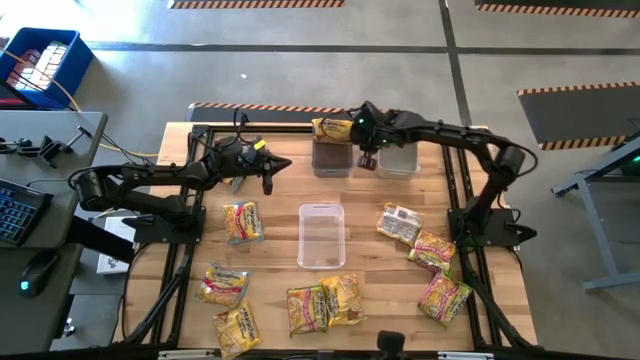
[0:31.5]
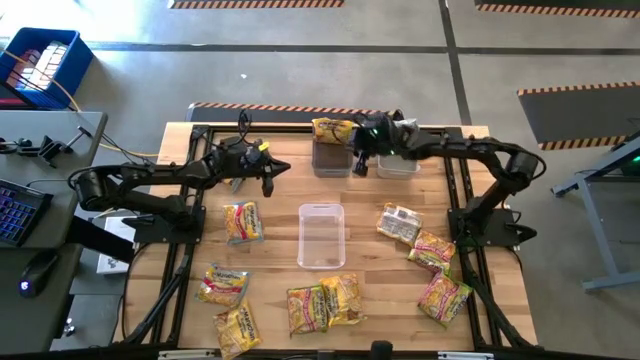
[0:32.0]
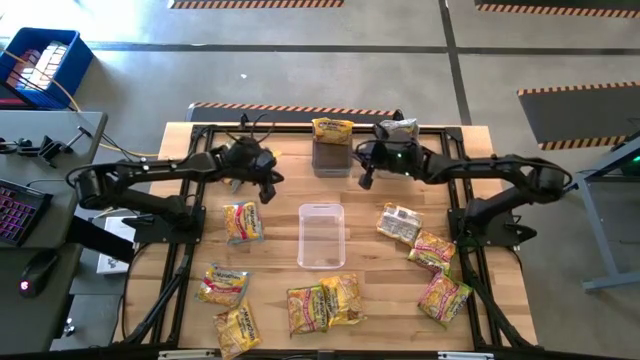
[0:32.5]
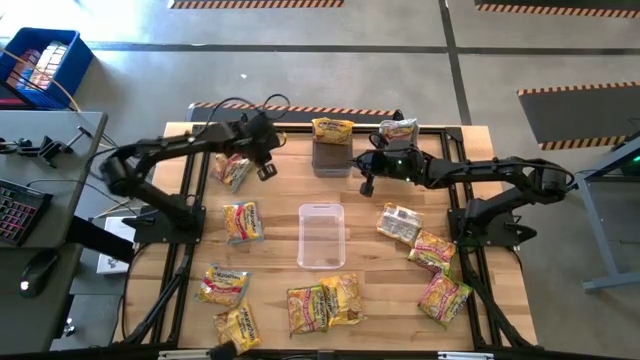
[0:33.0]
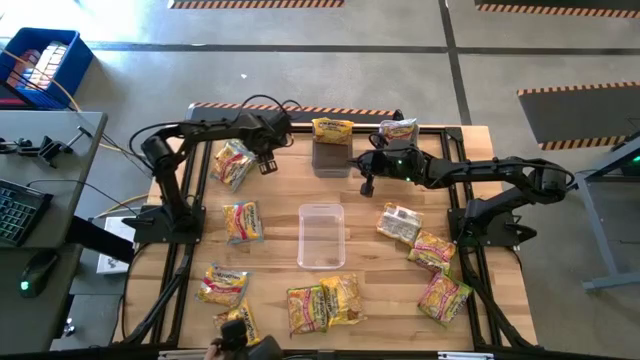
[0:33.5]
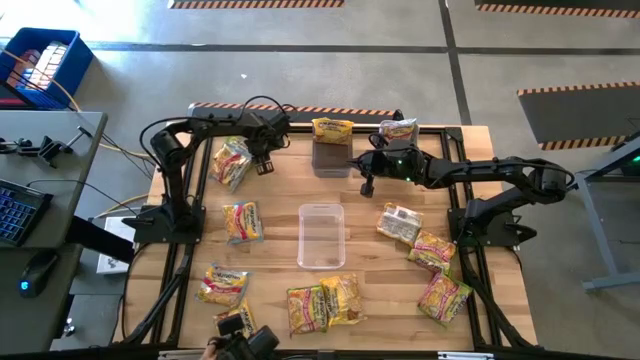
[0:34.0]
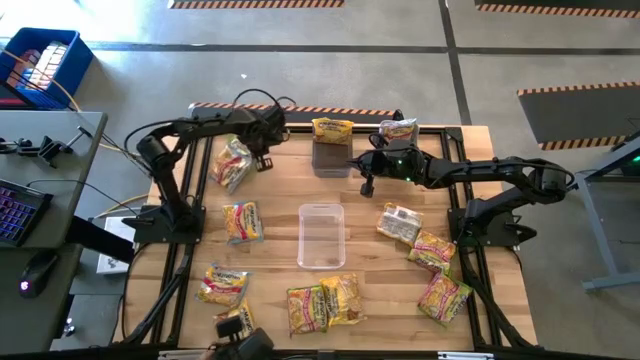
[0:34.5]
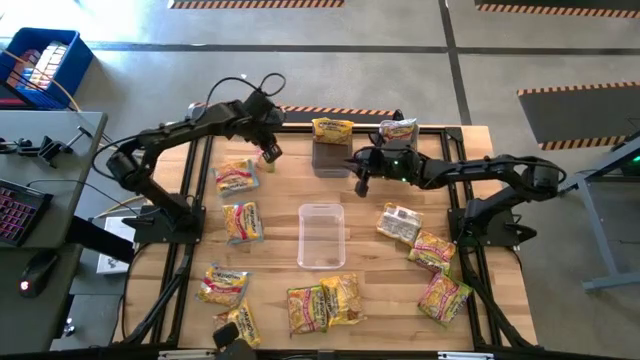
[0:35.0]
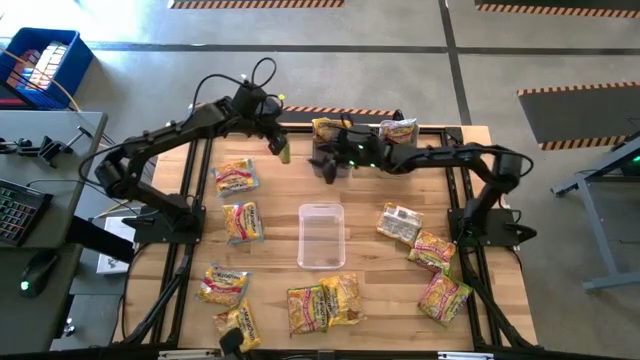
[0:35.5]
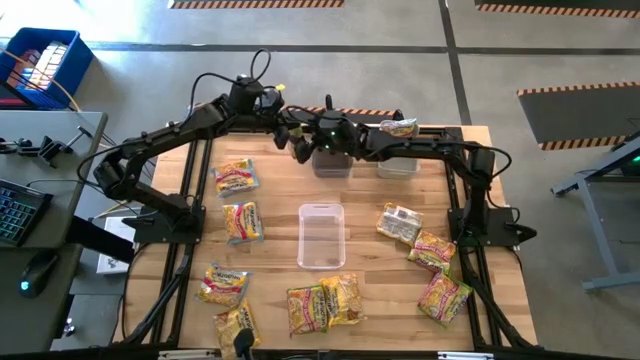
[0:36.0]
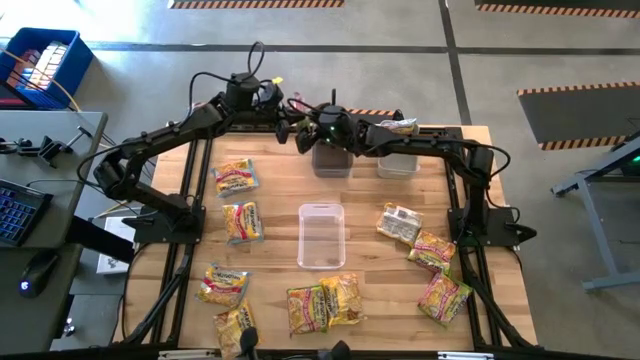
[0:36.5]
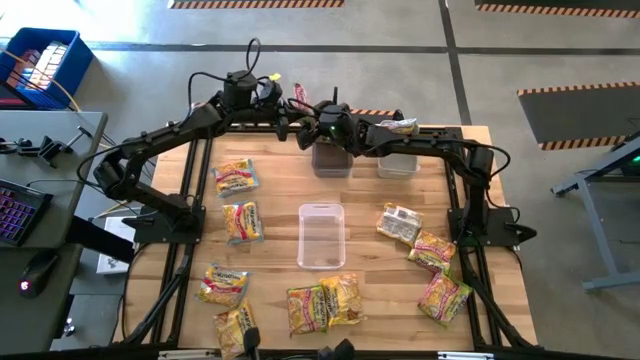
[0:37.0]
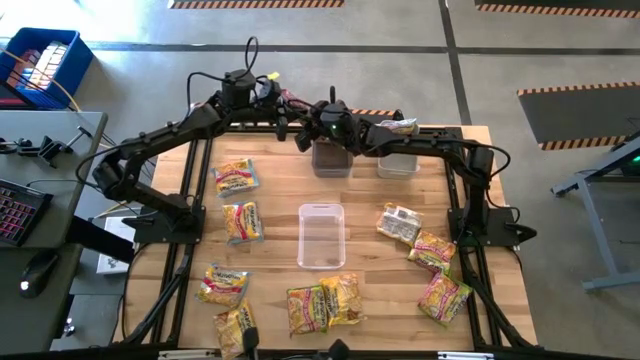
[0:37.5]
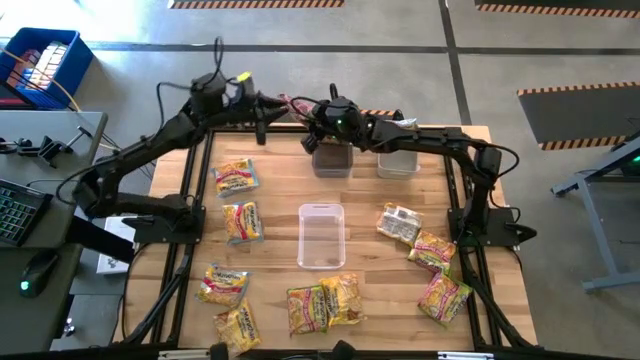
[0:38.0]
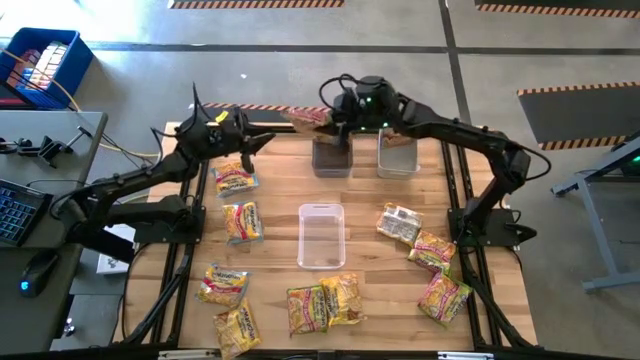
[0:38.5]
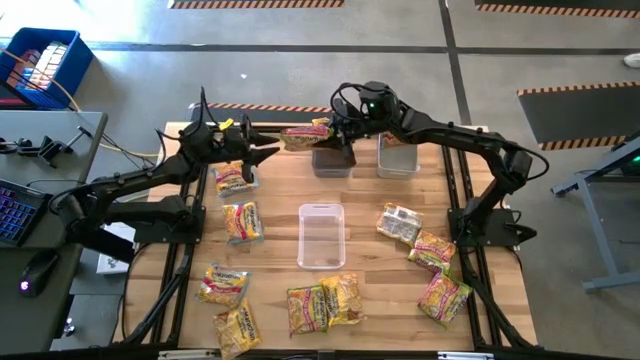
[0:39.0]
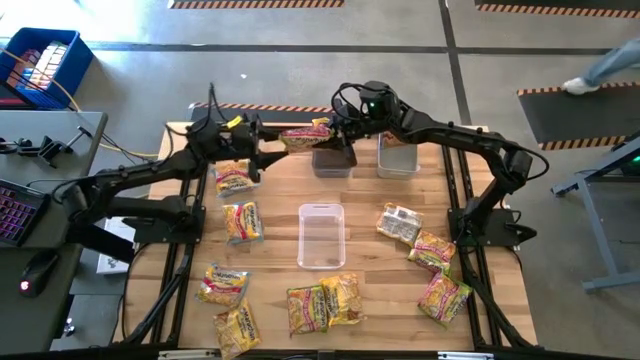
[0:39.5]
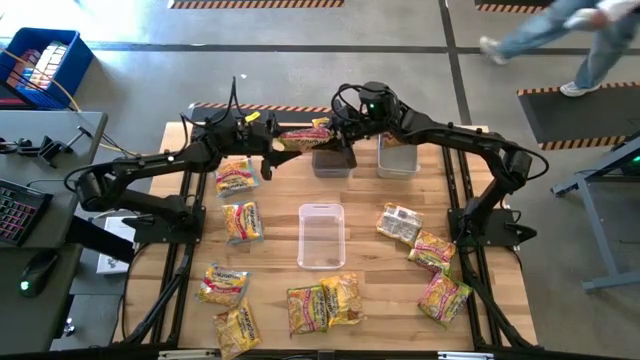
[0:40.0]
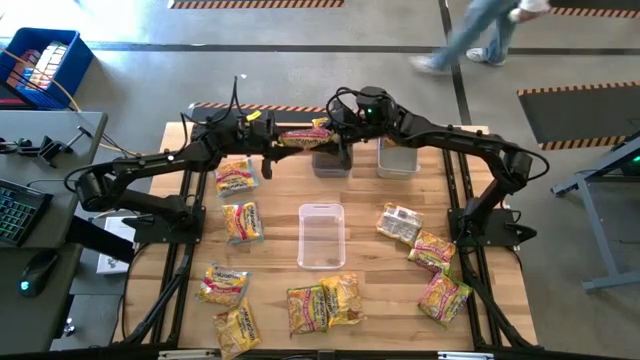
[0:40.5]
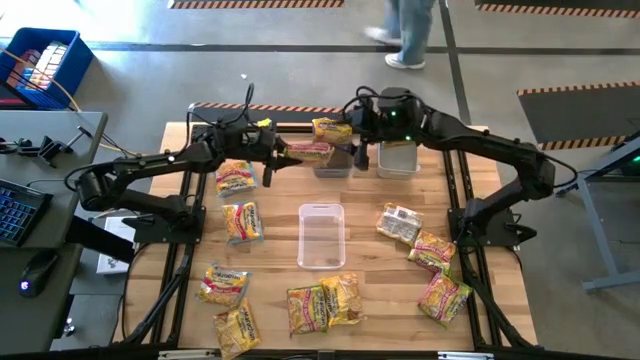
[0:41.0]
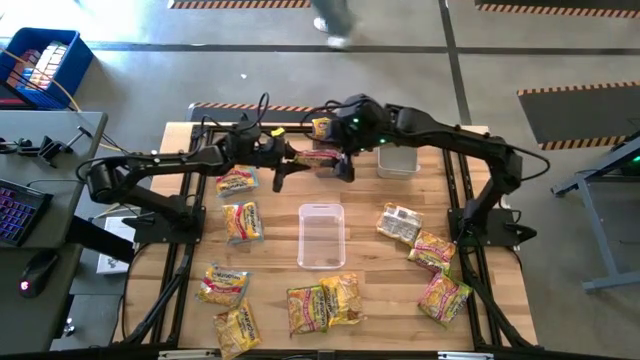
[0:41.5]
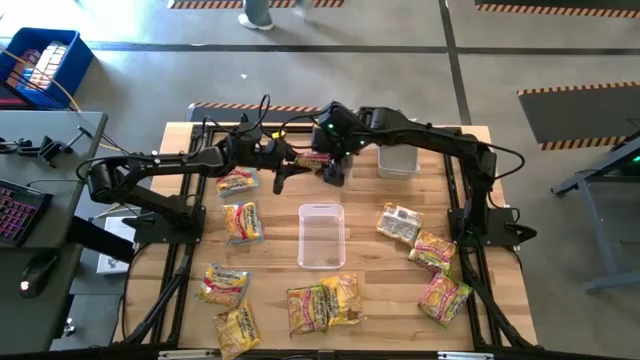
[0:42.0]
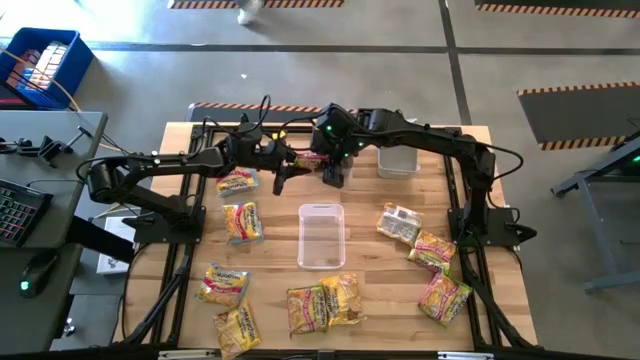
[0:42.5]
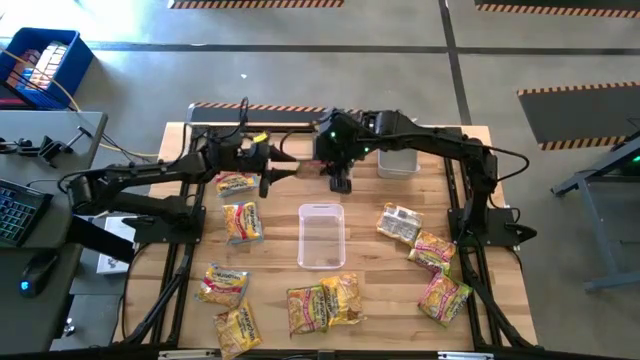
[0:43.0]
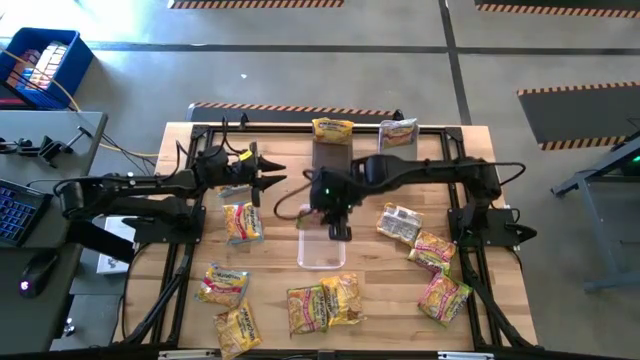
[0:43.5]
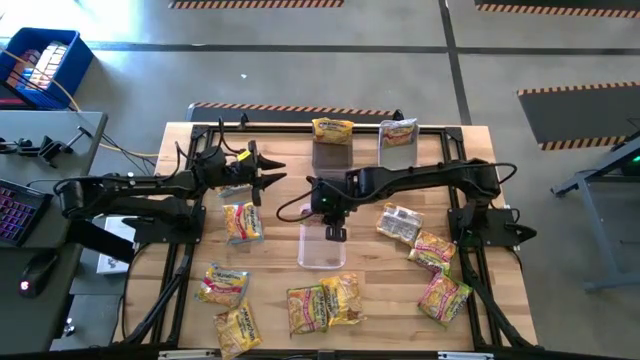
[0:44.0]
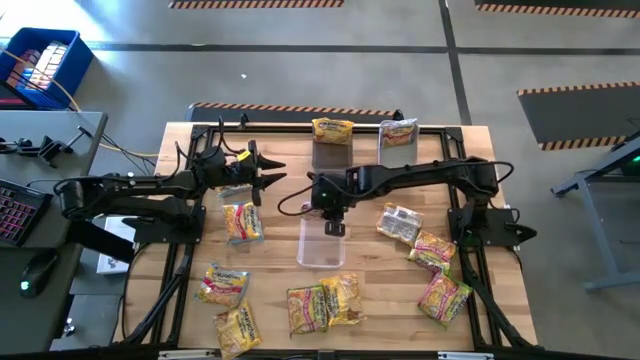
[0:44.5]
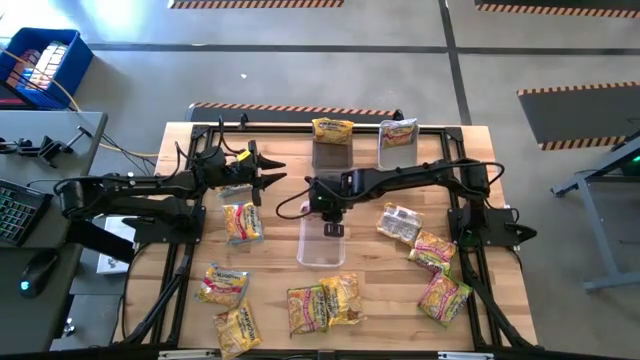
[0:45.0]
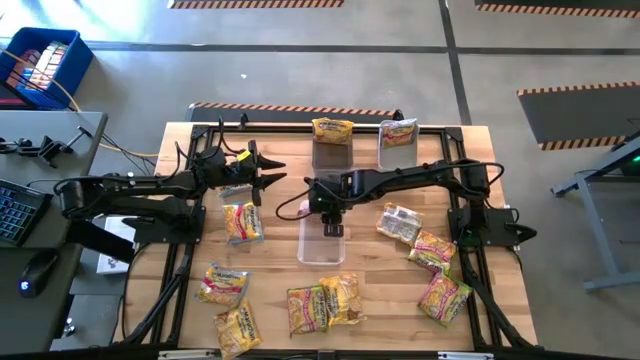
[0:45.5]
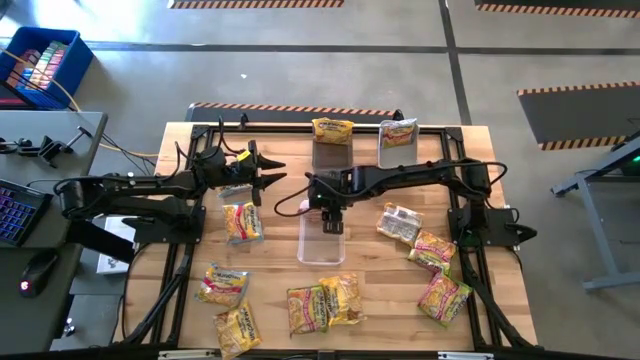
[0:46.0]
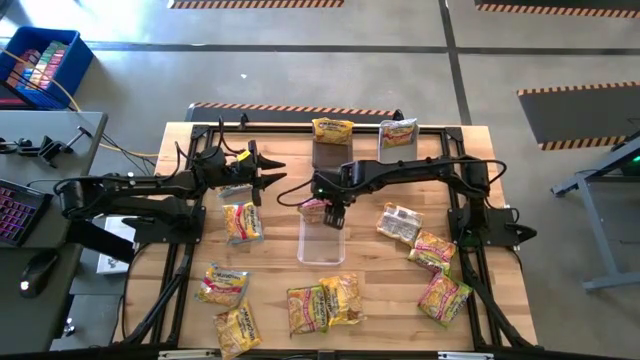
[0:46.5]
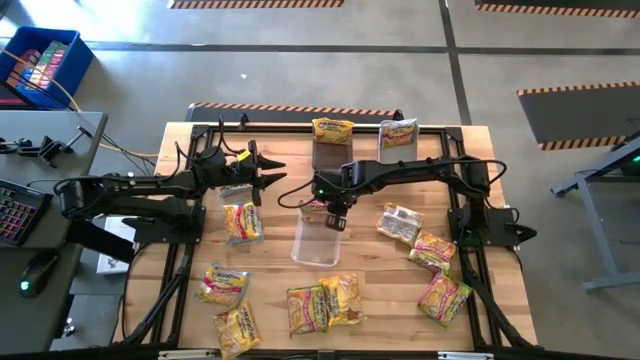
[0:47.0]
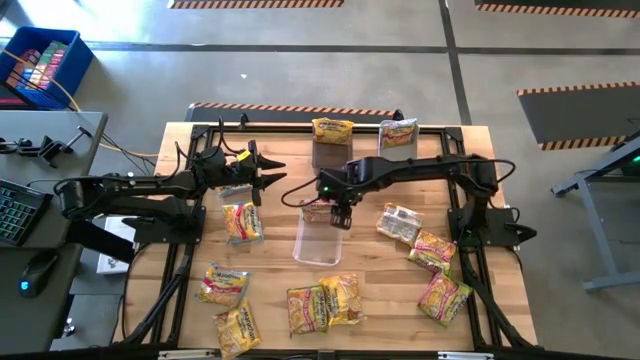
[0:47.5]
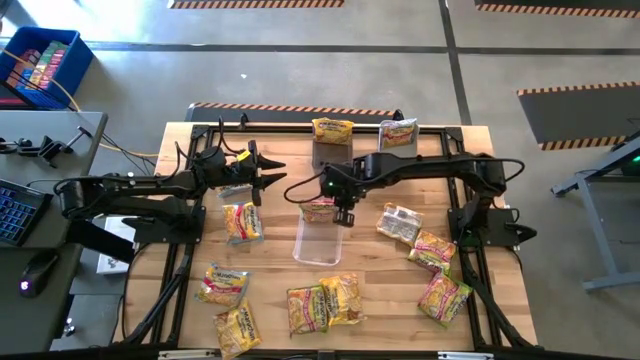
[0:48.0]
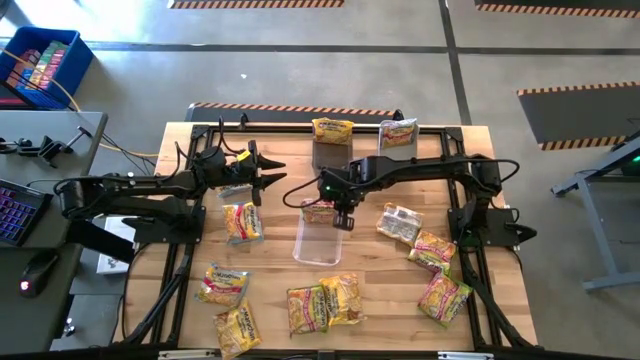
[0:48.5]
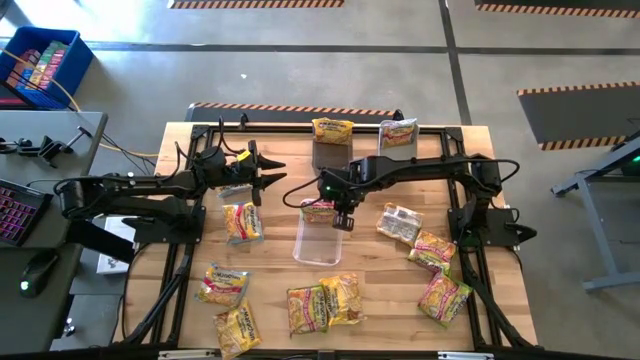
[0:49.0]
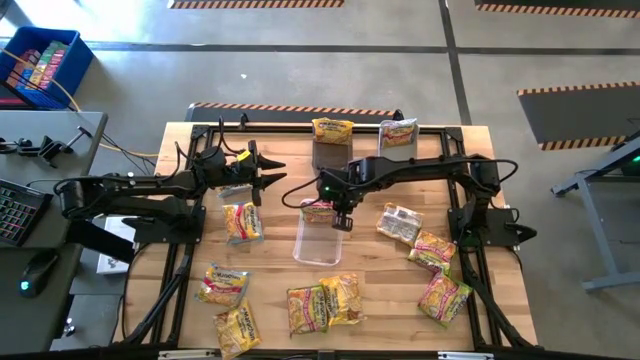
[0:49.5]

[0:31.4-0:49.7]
Task: Sort Maruchan noodles
Put the green noodle pack into the transparent bin

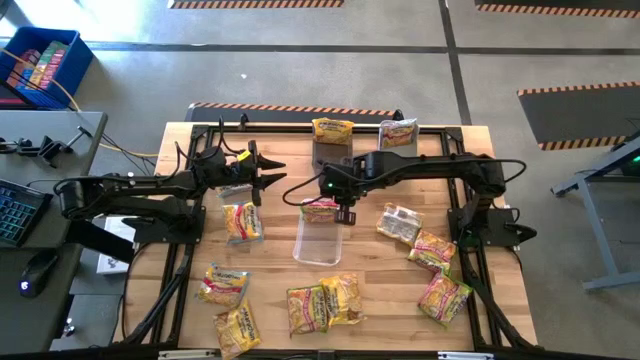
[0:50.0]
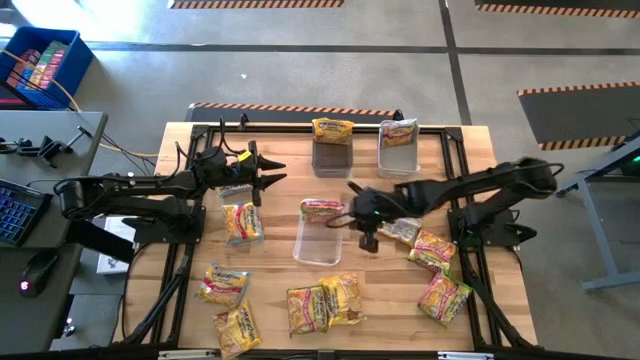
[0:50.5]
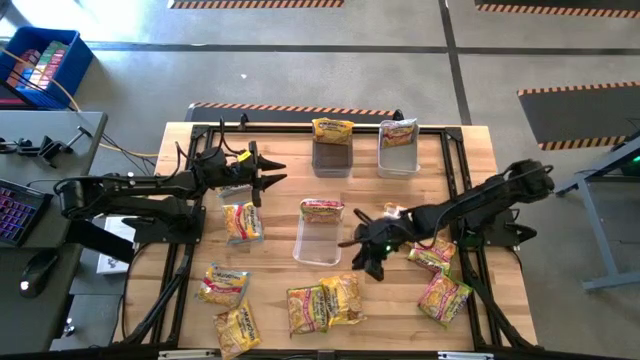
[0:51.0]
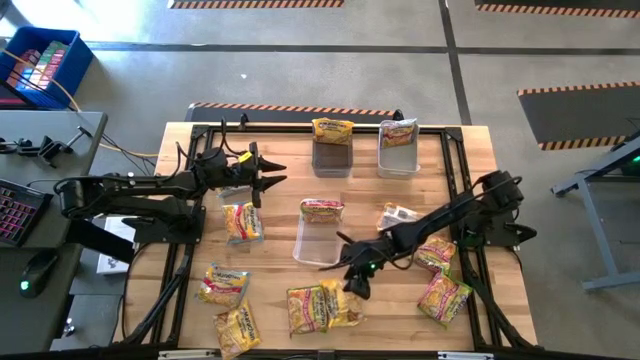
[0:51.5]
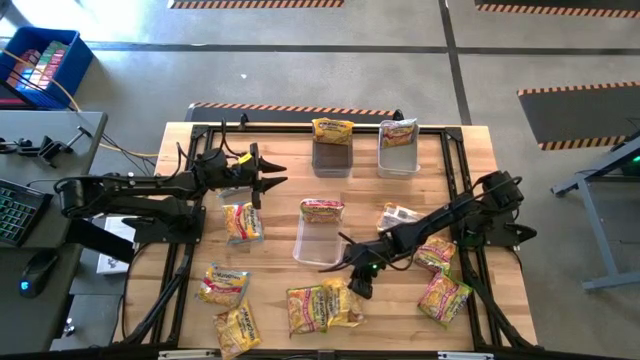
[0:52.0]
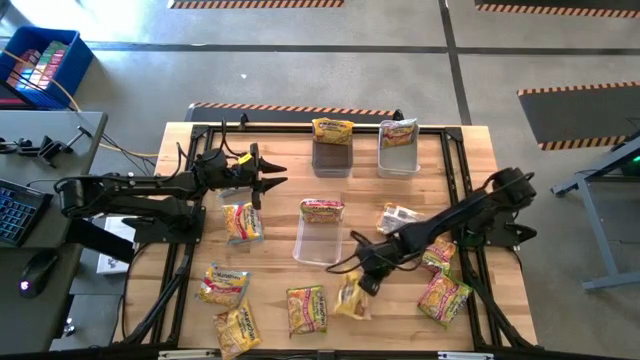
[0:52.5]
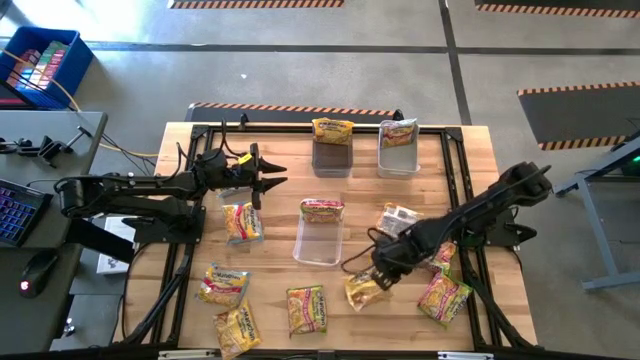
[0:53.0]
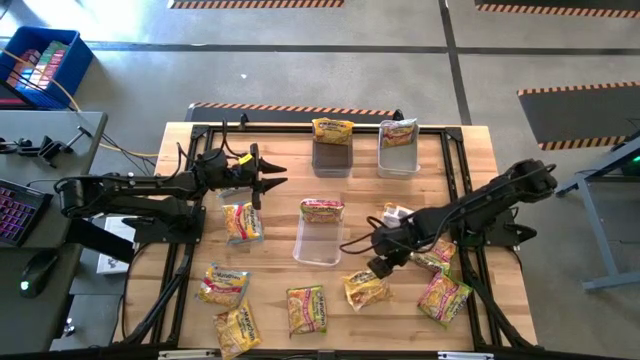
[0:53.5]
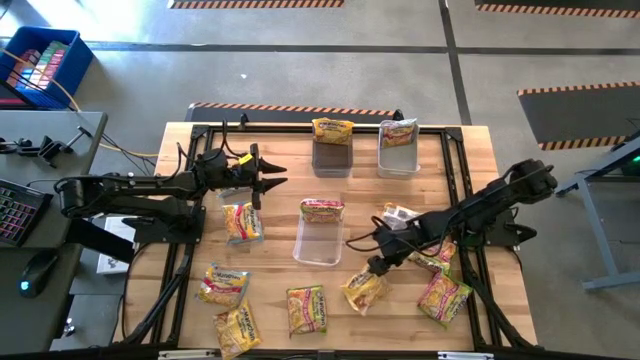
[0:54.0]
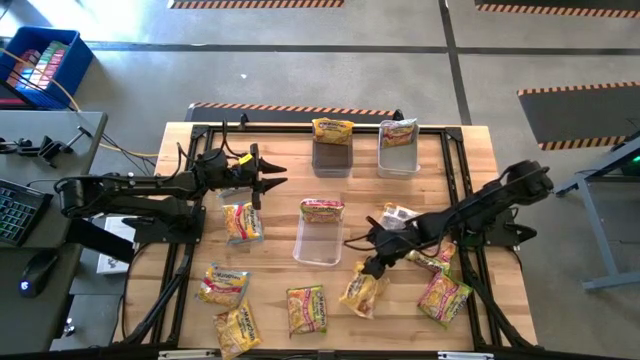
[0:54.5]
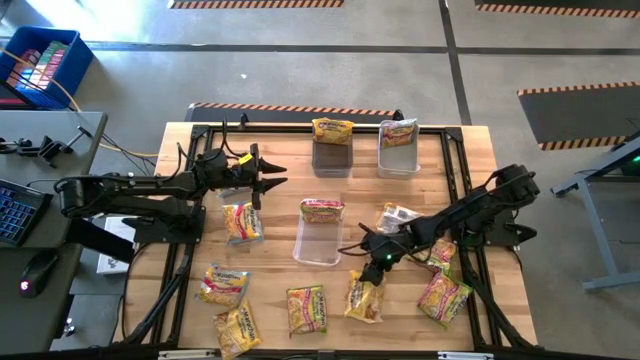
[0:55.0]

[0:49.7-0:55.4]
Put the yellow noodle pack into the black bin
